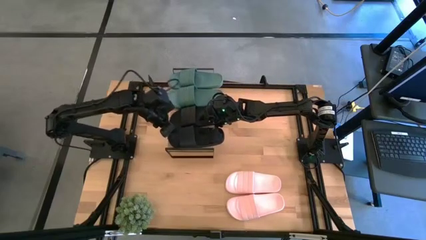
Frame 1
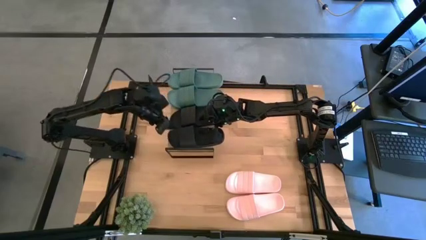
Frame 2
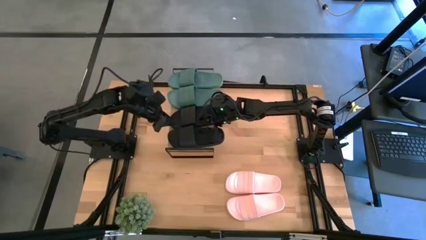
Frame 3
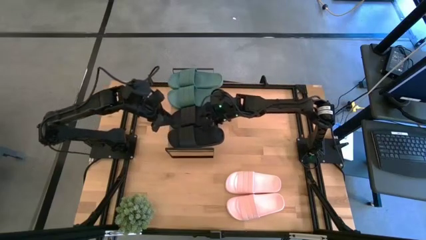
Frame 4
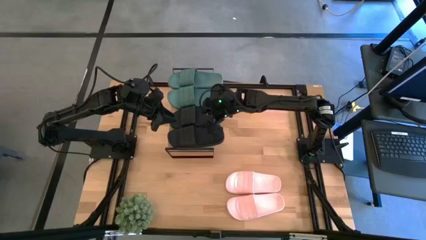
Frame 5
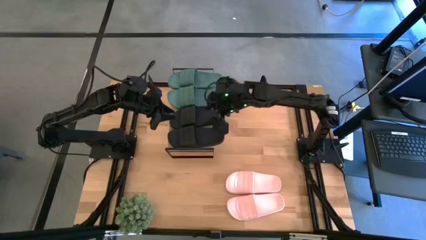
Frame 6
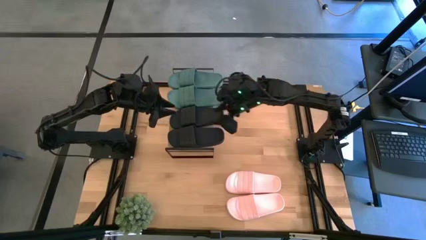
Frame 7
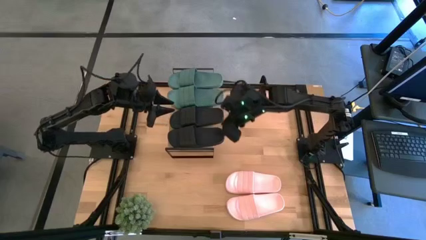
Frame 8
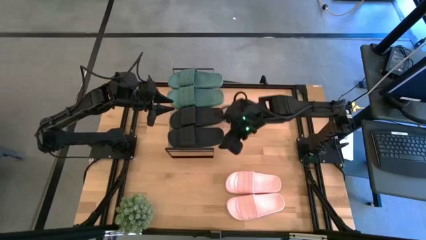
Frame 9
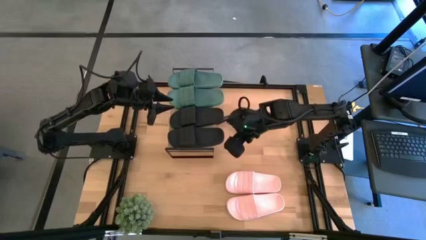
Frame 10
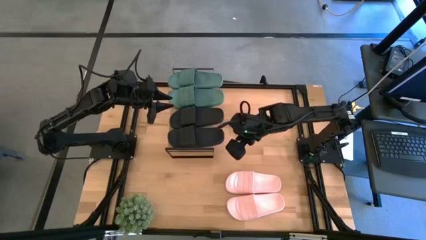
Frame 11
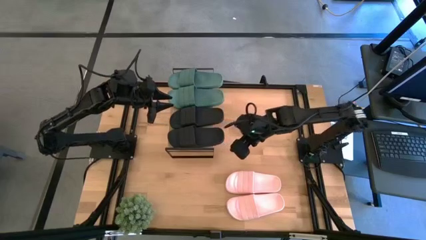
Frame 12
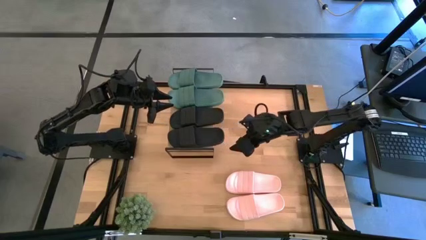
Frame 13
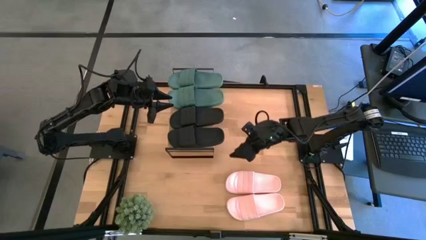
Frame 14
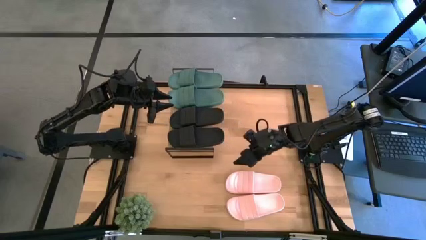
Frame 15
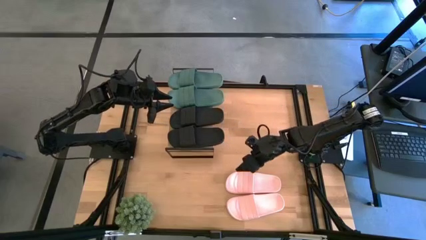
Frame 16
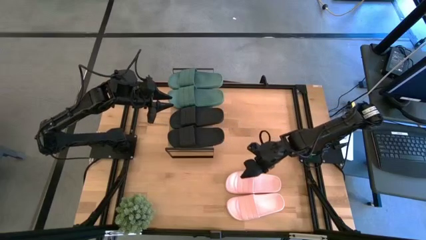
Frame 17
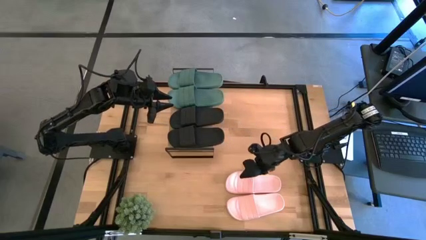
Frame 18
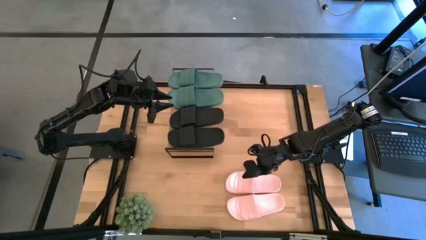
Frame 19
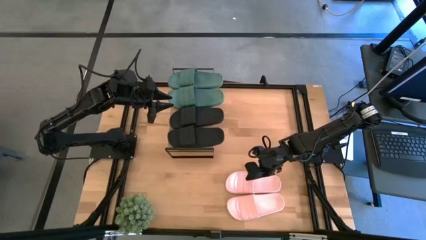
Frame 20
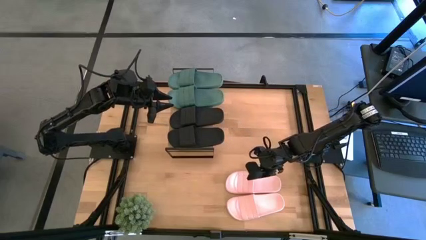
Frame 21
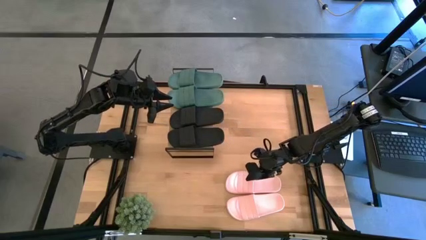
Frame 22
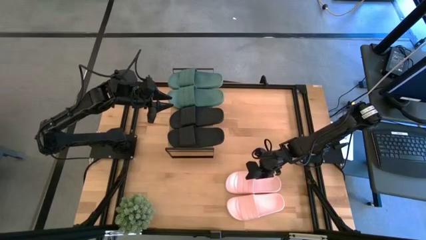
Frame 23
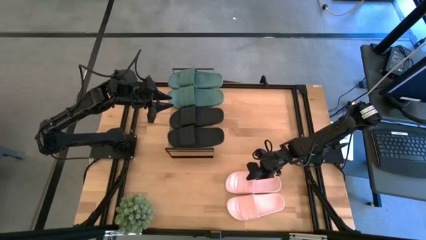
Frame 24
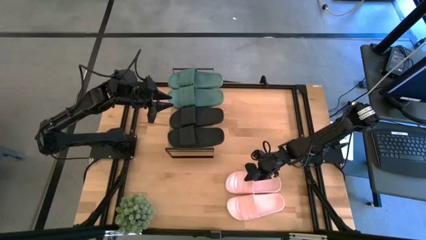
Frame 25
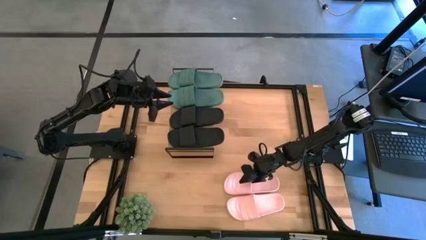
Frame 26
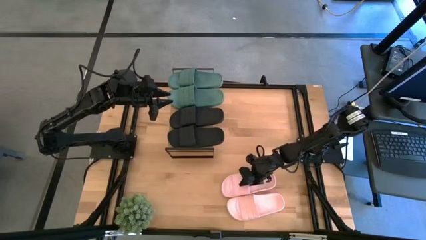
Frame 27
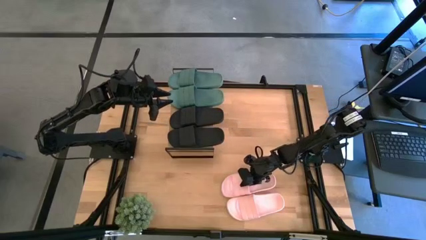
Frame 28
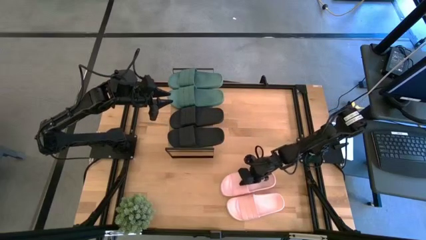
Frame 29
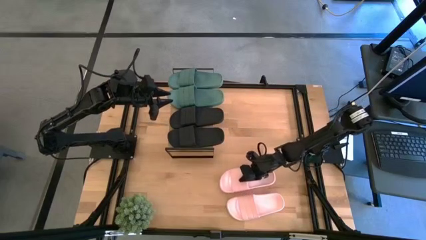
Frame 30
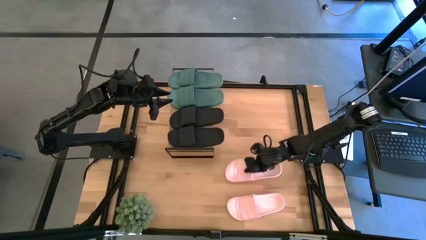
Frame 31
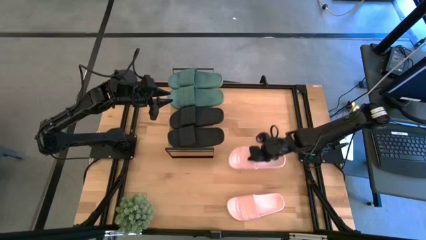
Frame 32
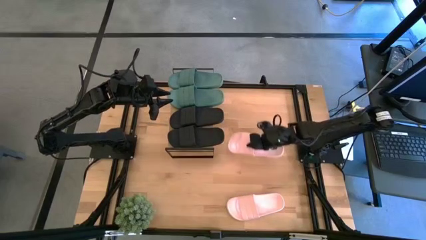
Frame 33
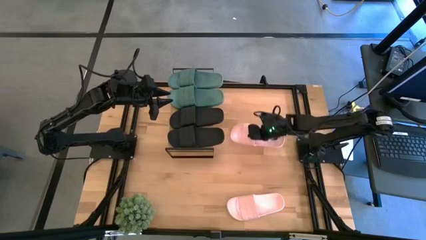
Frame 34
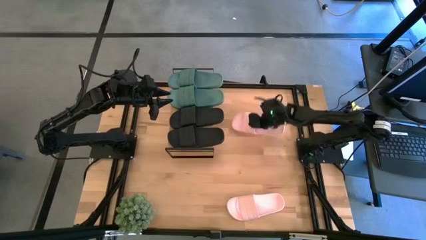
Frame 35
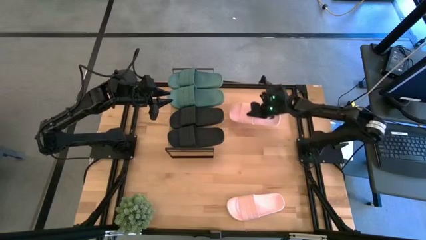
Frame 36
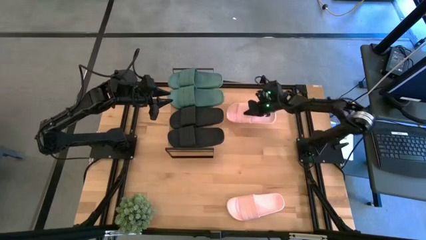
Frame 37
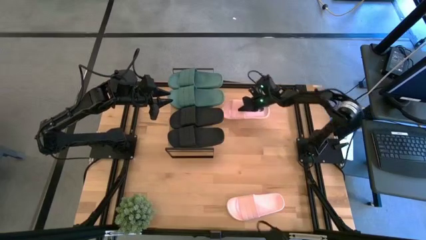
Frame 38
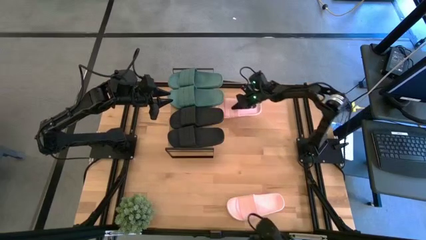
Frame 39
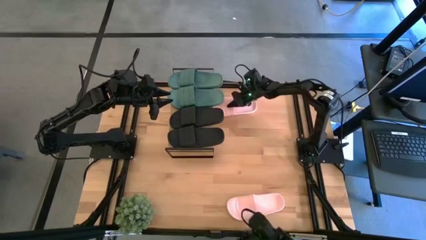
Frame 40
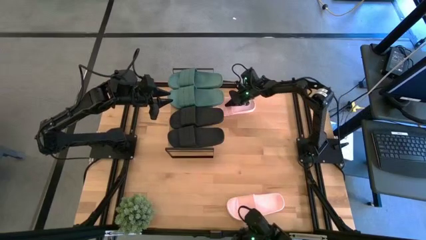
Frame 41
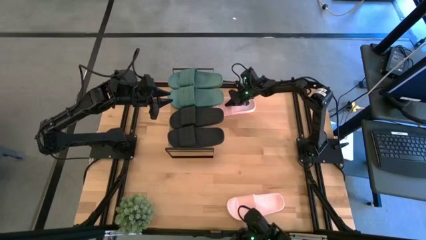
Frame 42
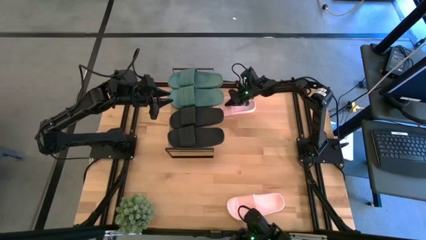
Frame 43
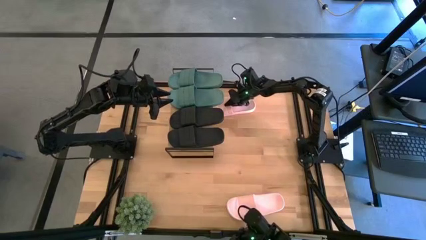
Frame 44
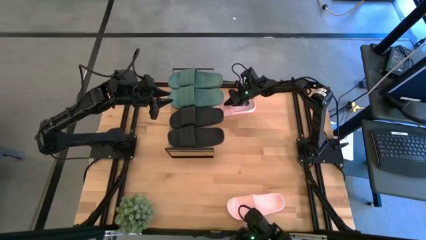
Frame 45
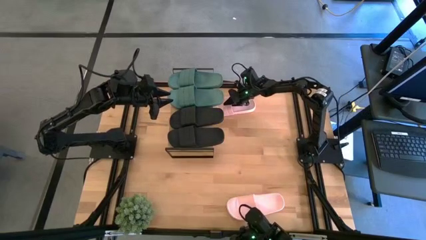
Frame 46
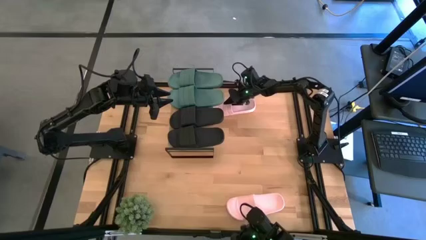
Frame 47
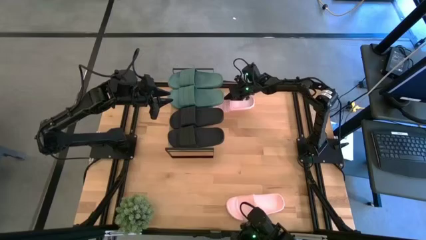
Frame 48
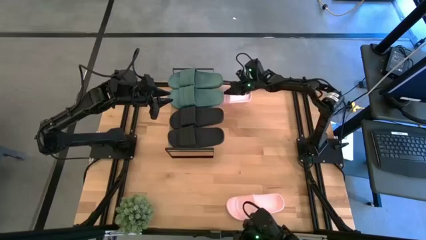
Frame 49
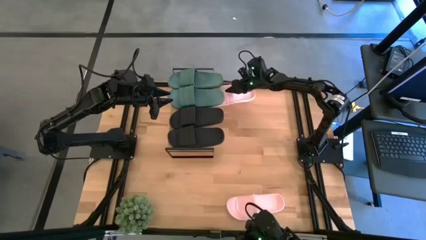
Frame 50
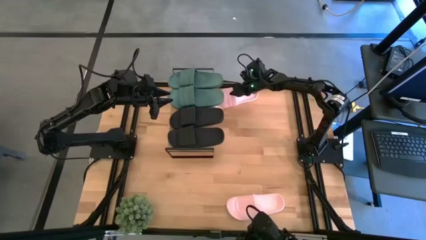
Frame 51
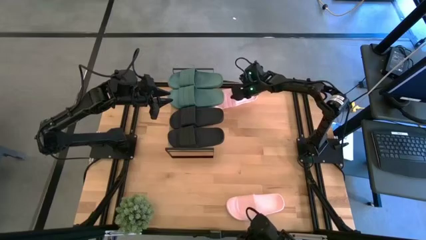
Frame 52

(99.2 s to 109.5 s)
Task: Pick and place slides into the shelf
Put the right pink slipper underneath the shelf
